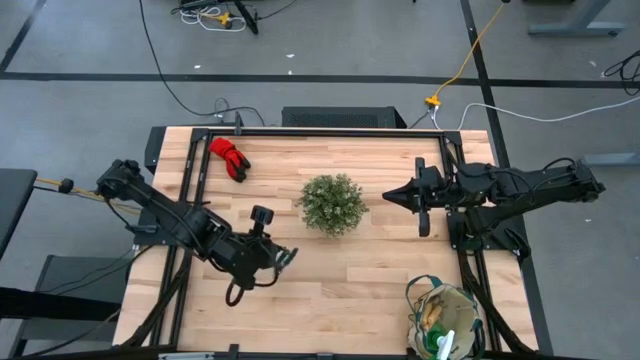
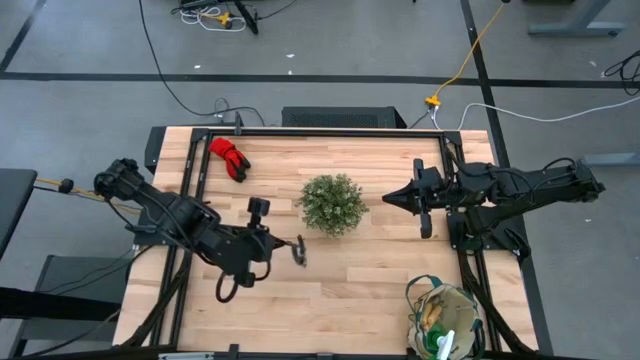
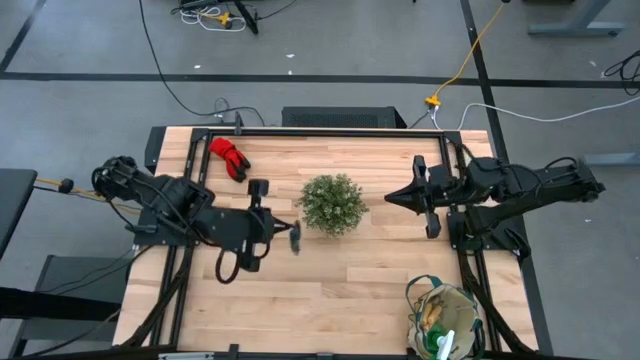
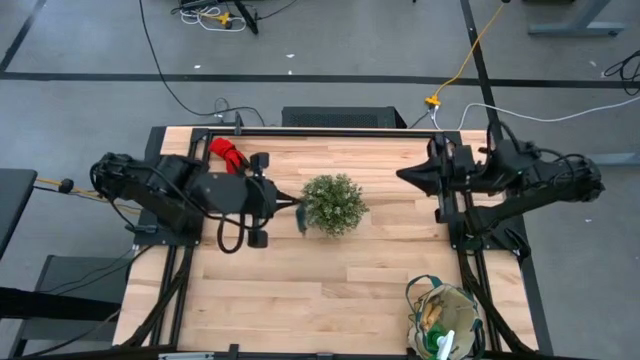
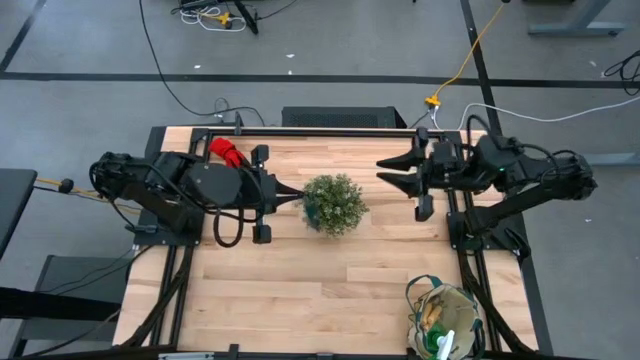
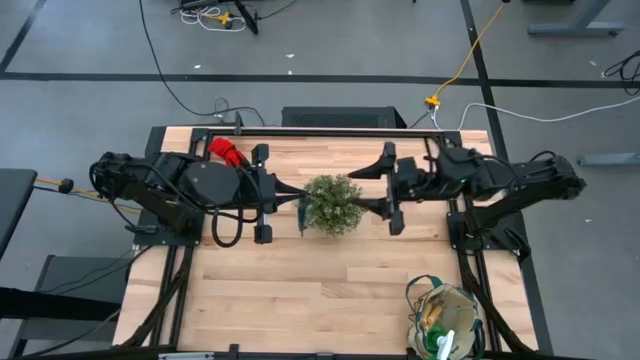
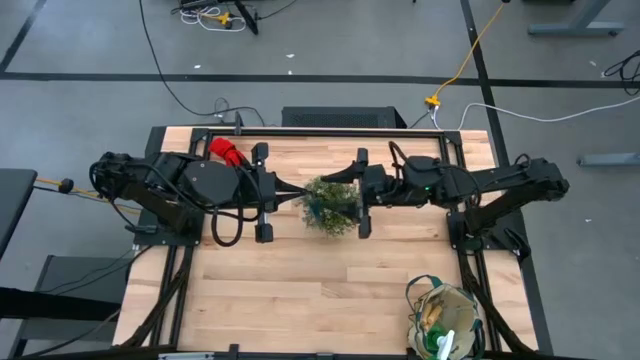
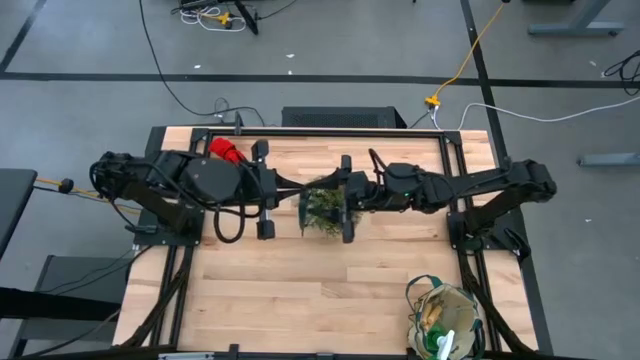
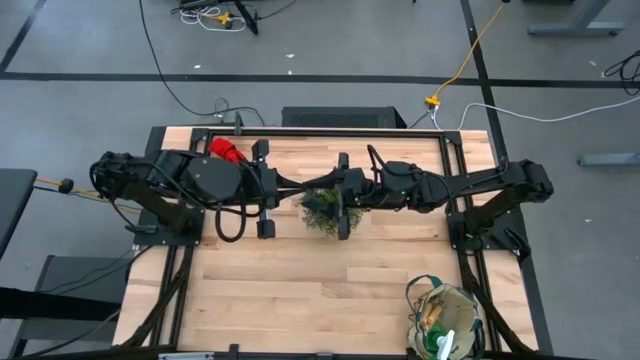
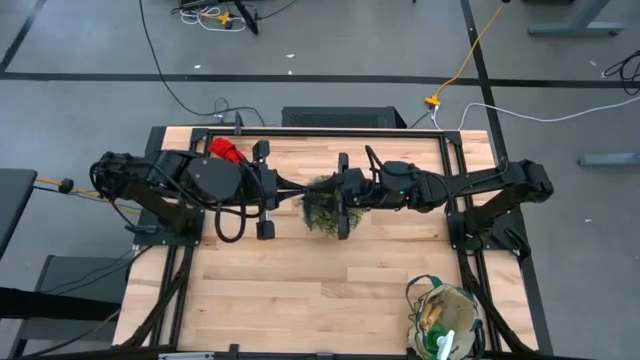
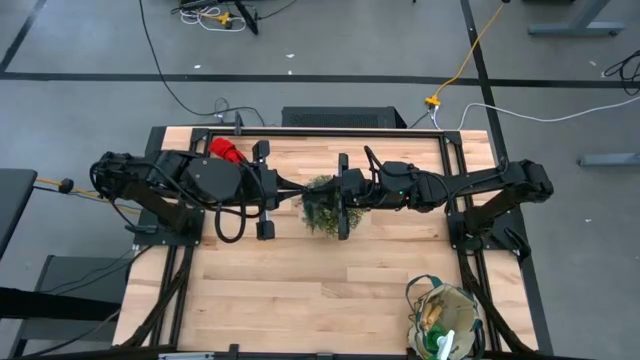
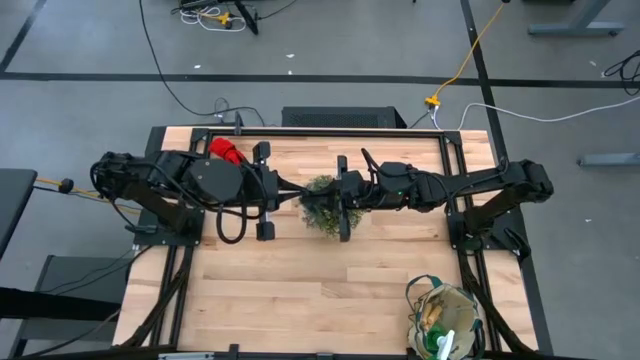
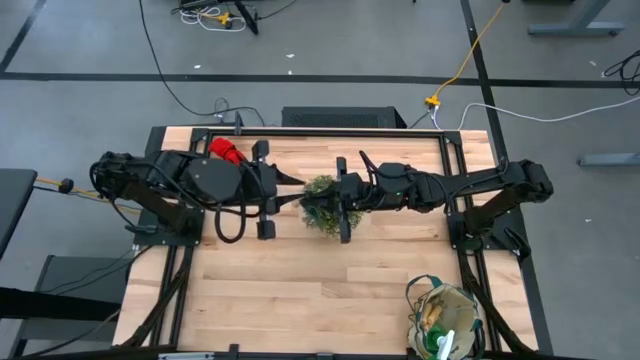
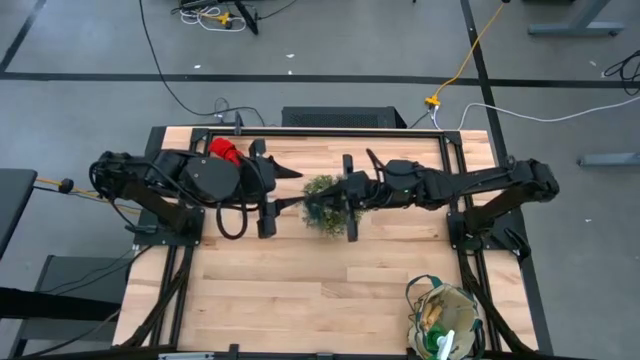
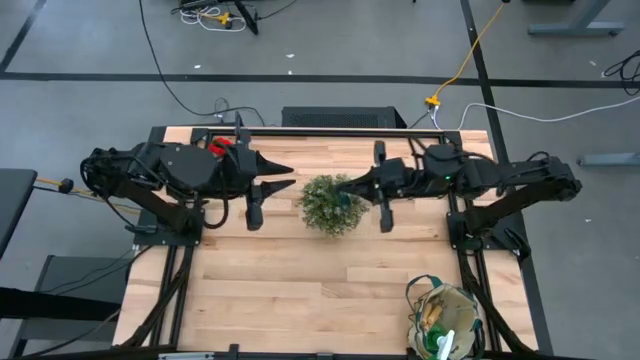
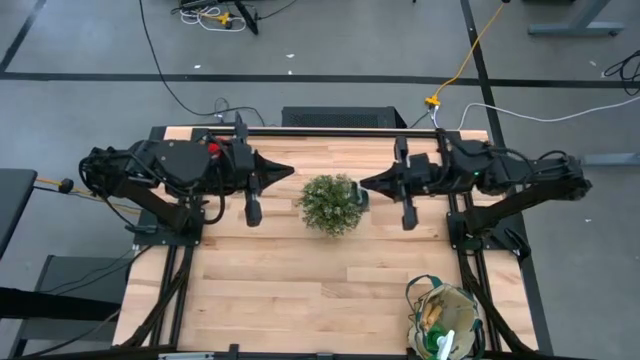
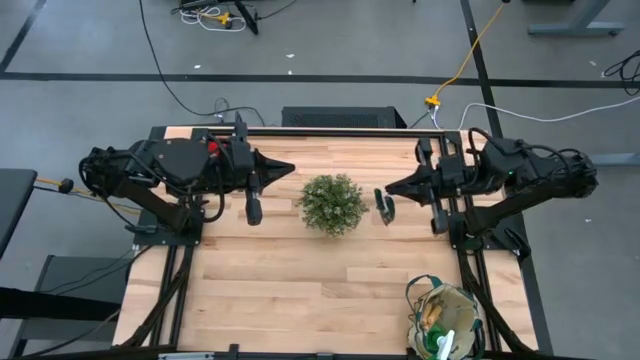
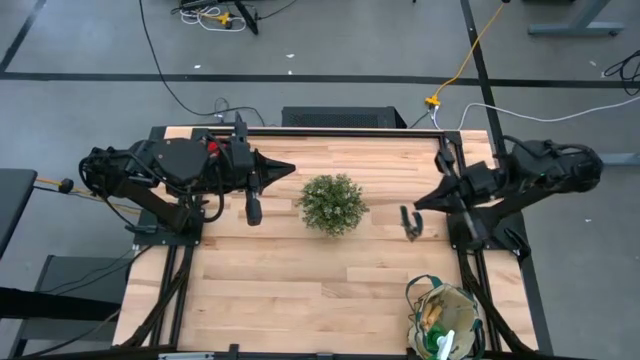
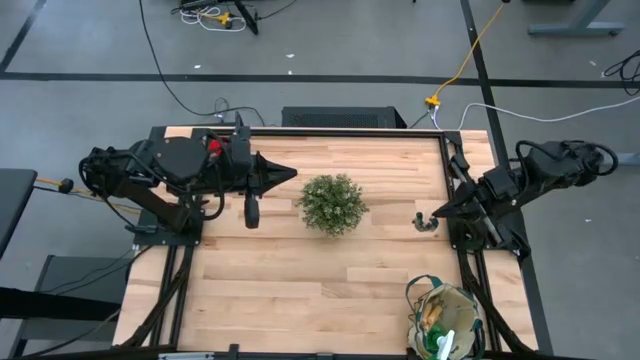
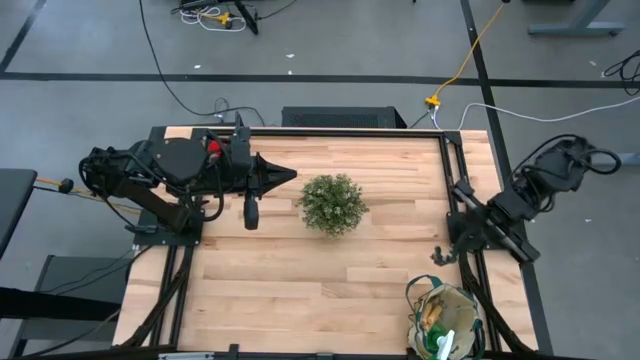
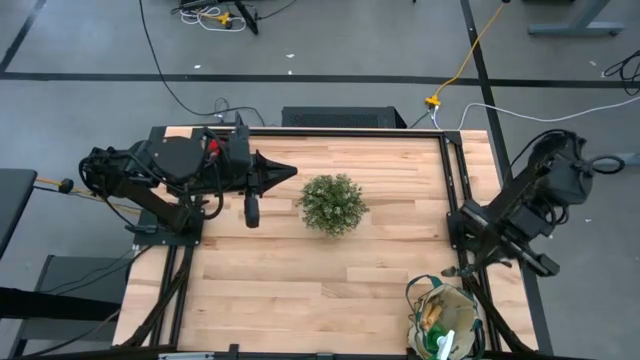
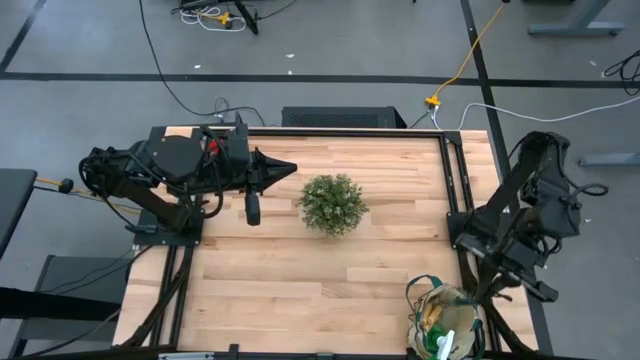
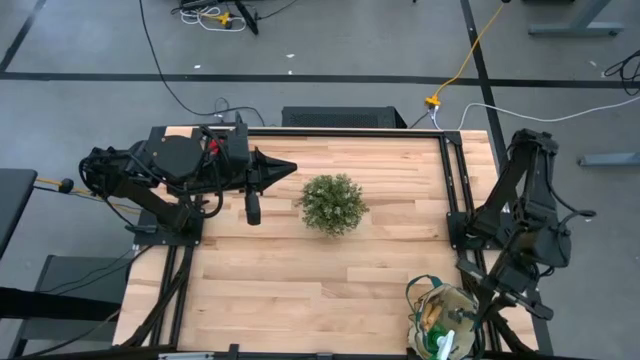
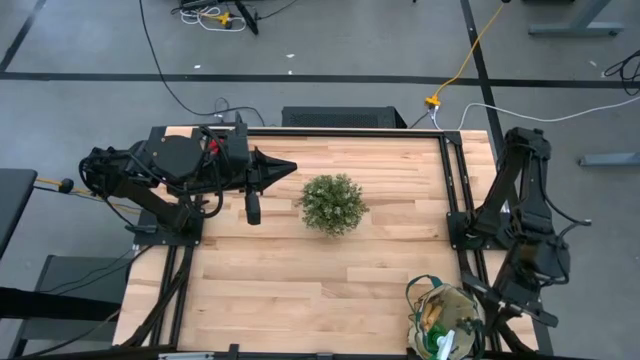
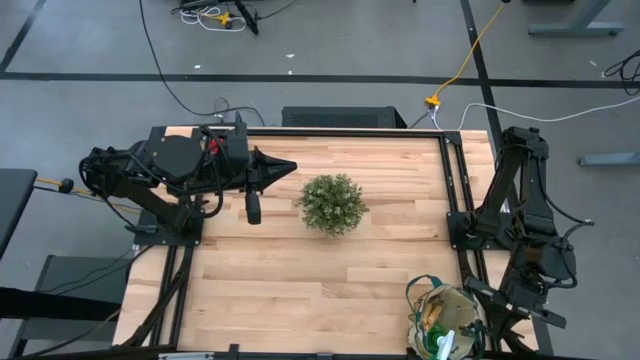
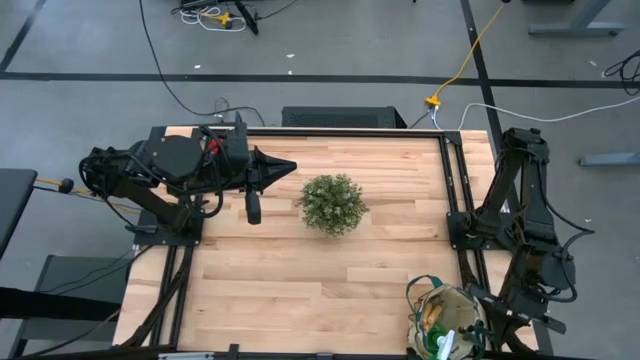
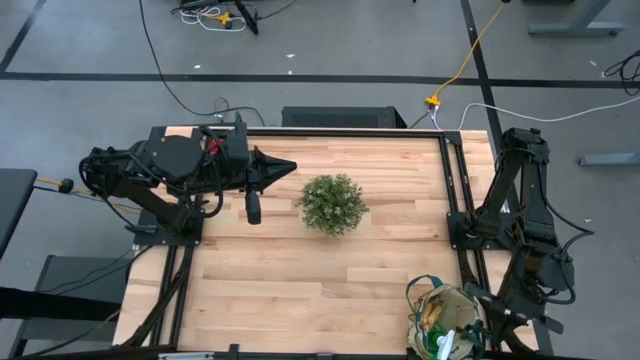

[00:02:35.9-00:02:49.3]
Task: Pick & Place Garden tools in Gardening bag
Put the green shear scissors into the white gardening bag

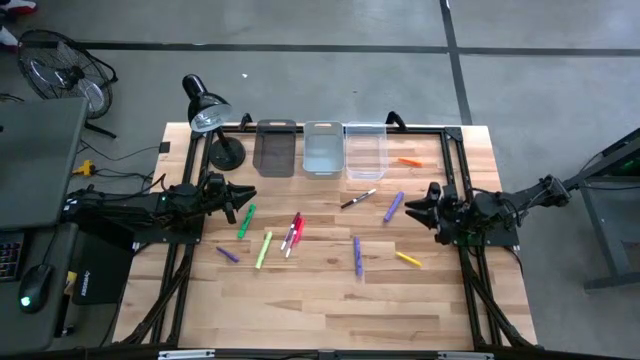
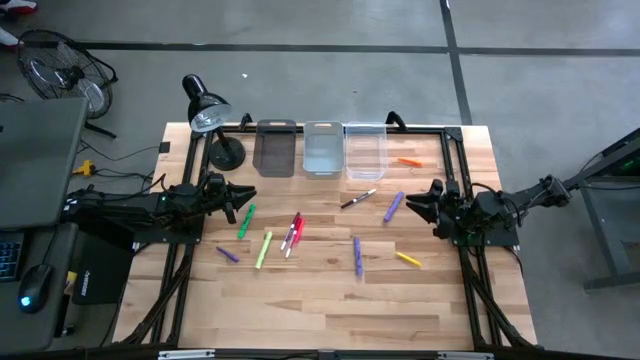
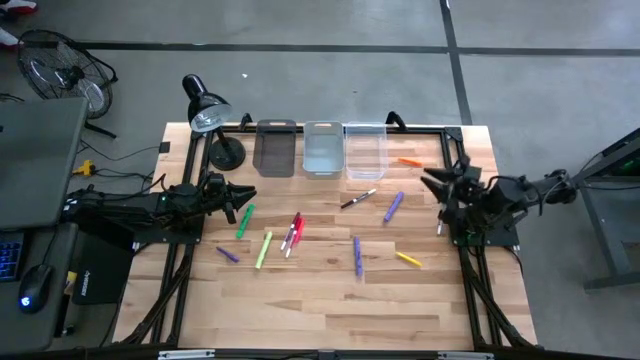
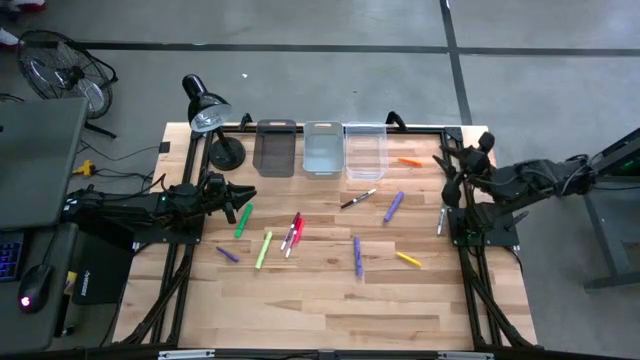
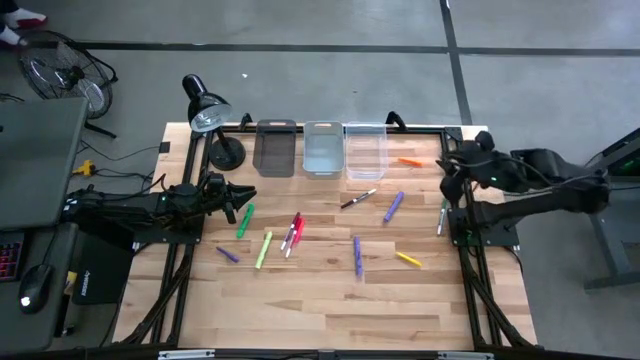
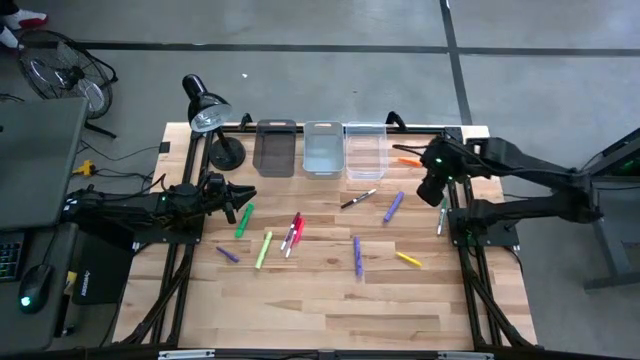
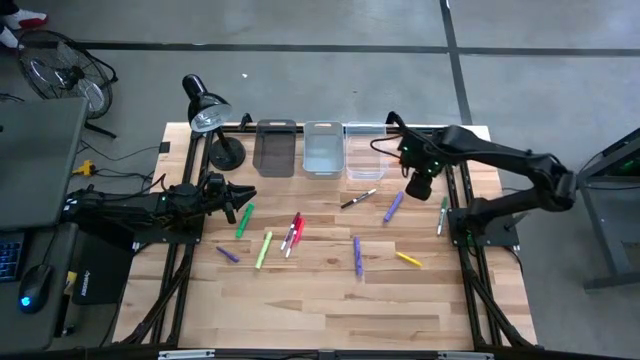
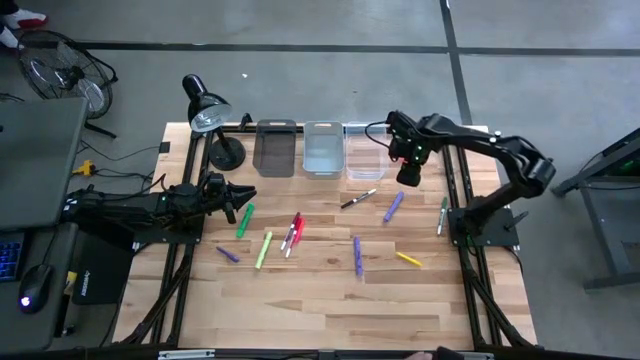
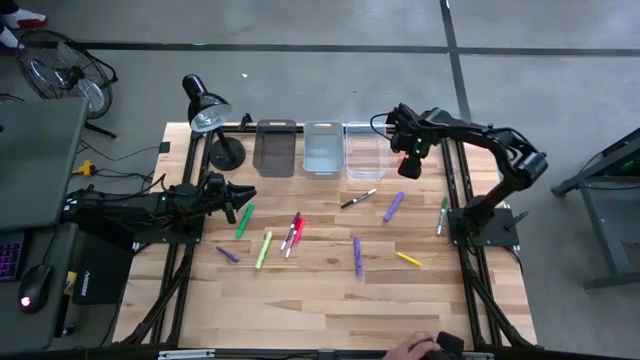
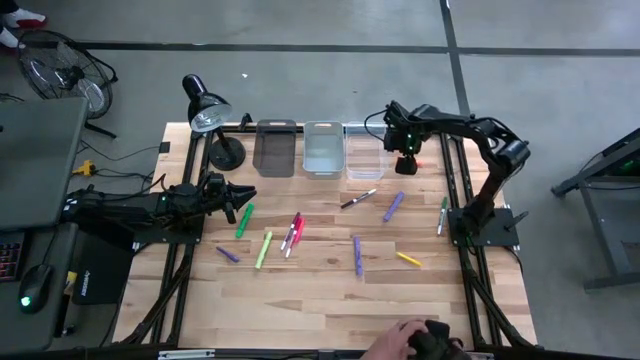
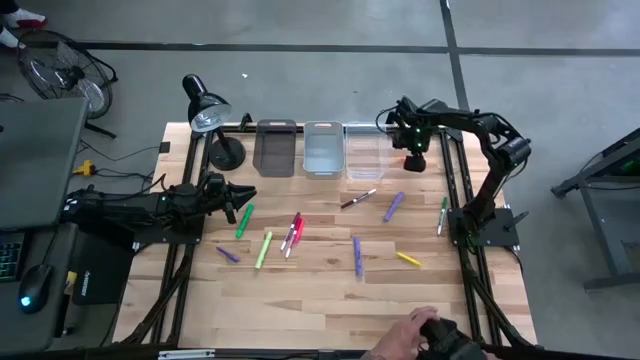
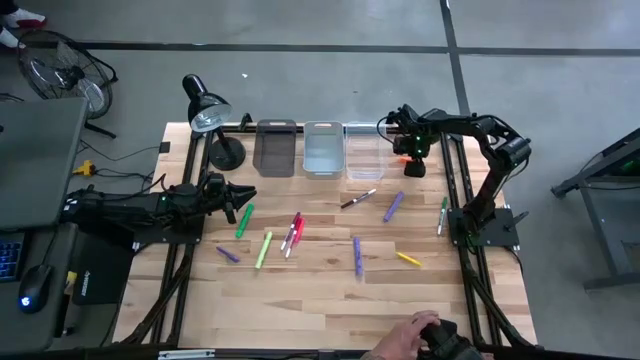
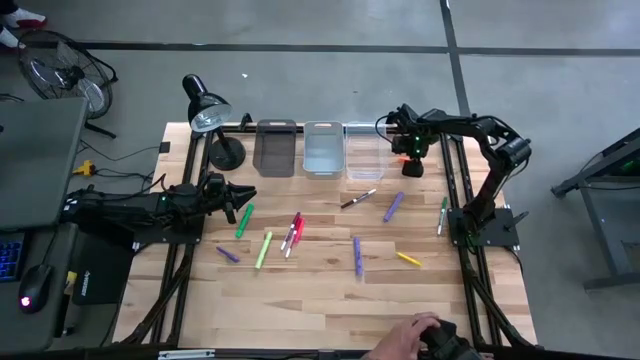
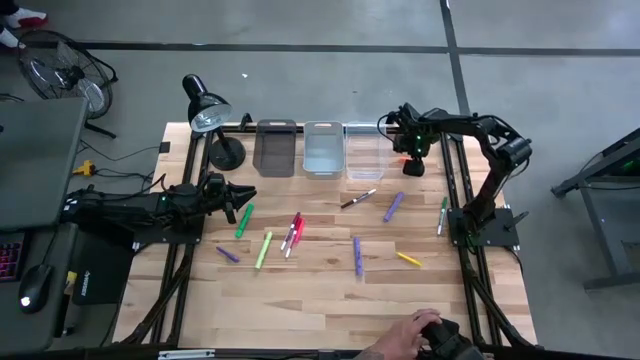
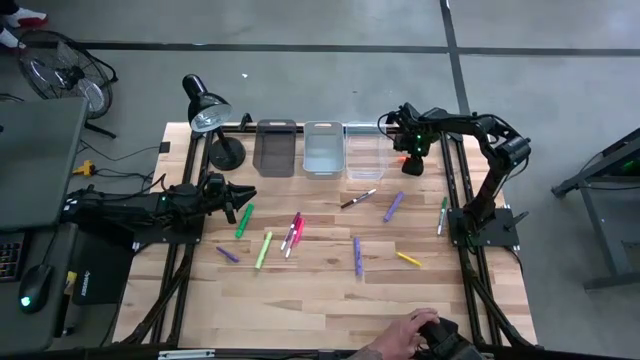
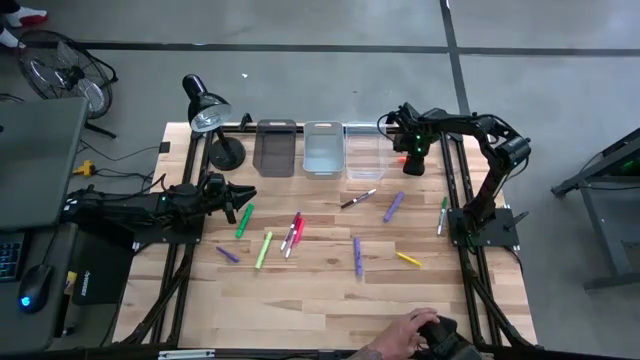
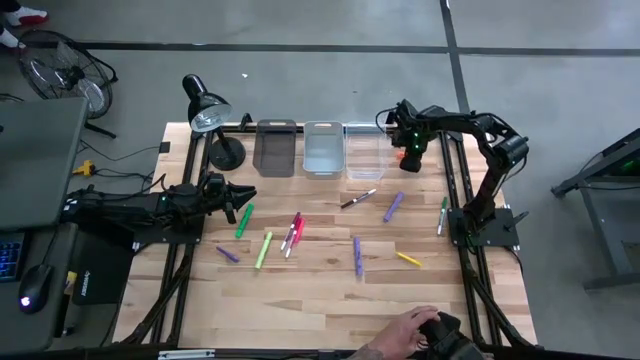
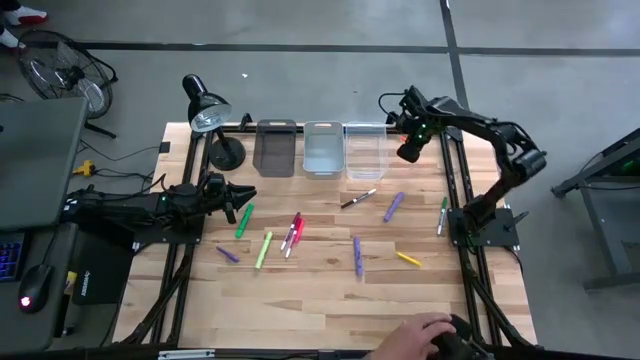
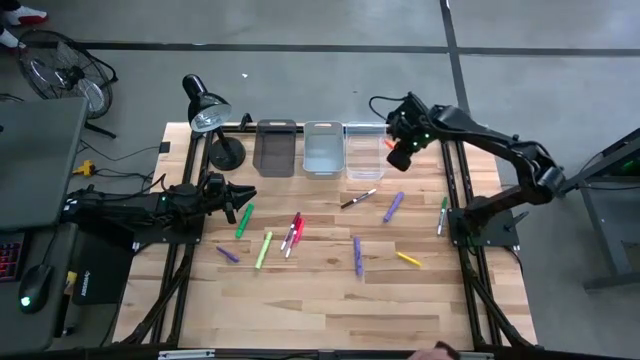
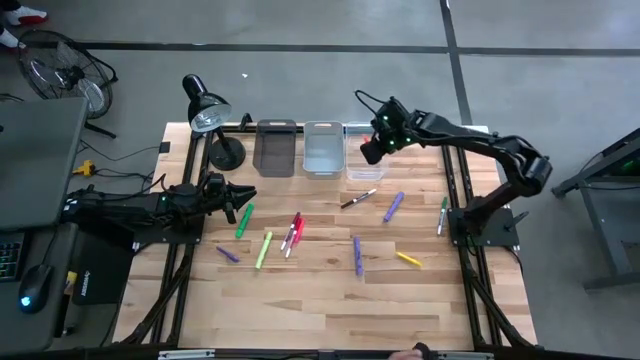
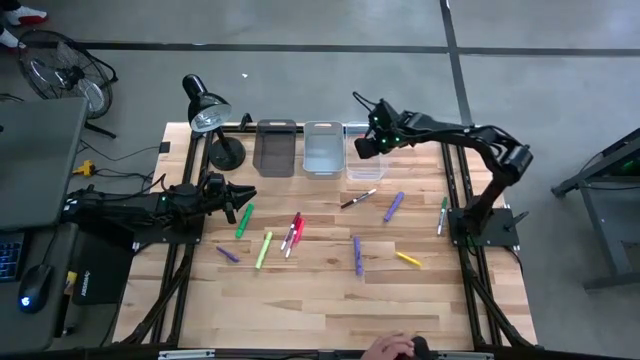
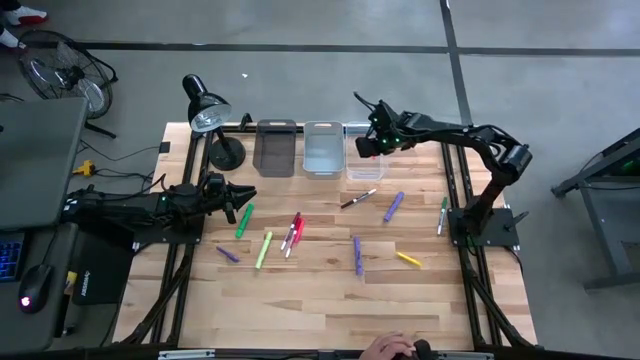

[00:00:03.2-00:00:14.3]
Task: Pick & Place Markers
Put the orange pen into the transparent bin
